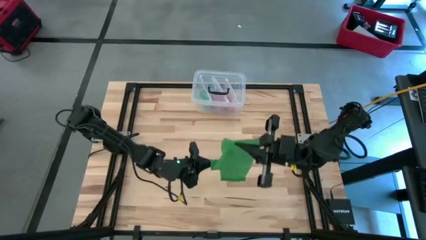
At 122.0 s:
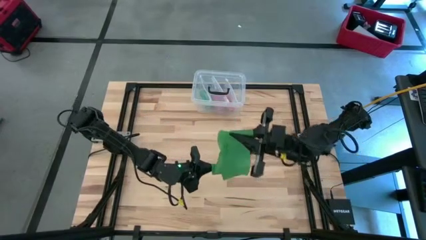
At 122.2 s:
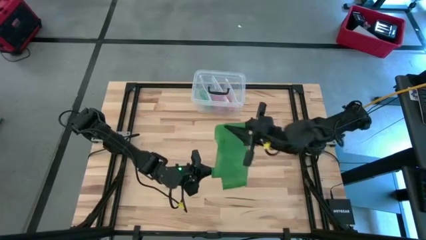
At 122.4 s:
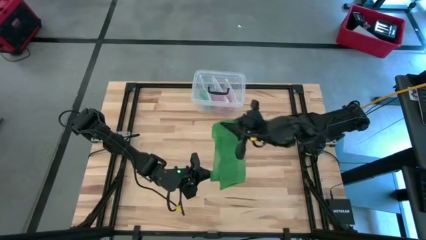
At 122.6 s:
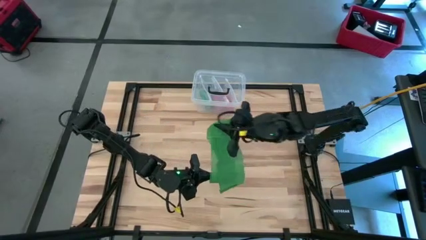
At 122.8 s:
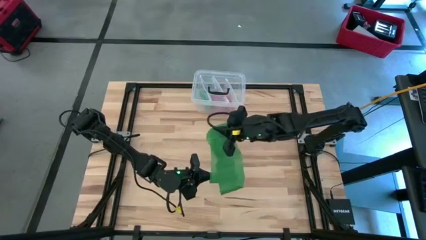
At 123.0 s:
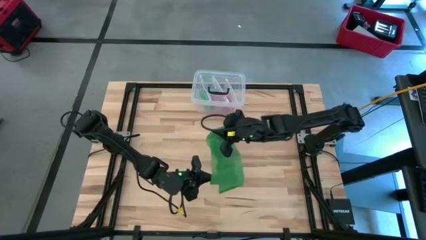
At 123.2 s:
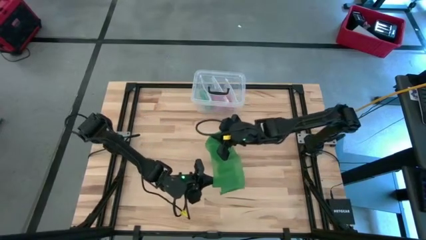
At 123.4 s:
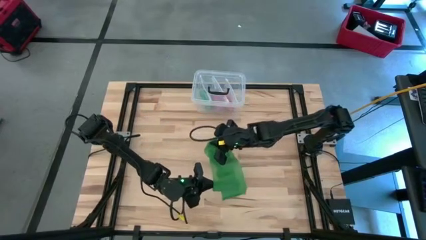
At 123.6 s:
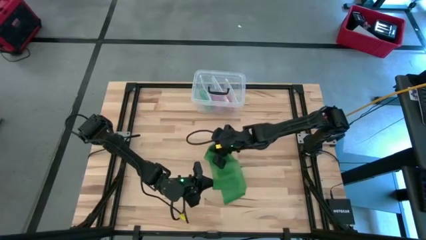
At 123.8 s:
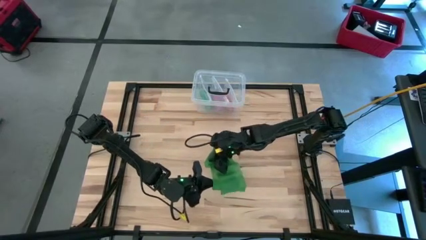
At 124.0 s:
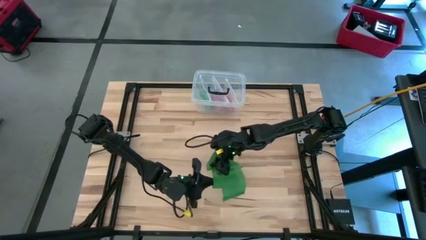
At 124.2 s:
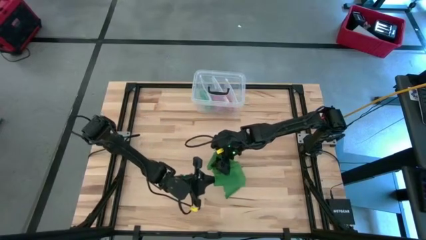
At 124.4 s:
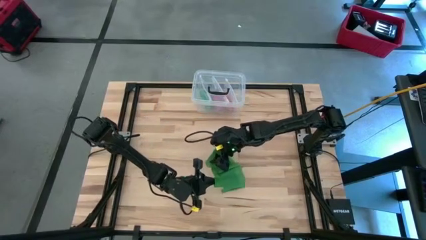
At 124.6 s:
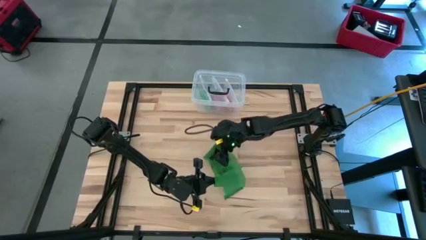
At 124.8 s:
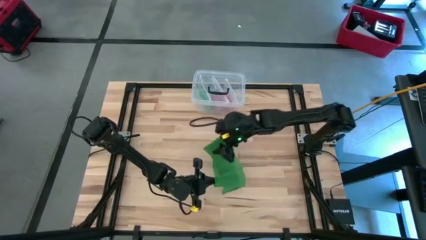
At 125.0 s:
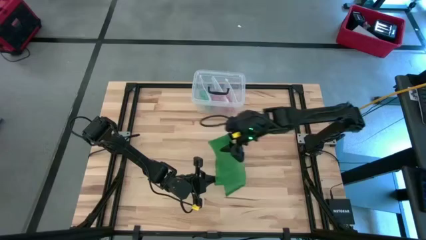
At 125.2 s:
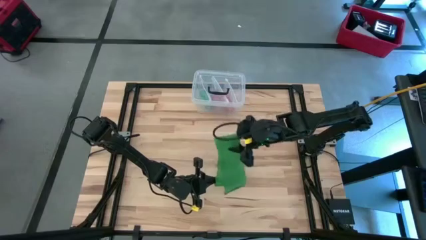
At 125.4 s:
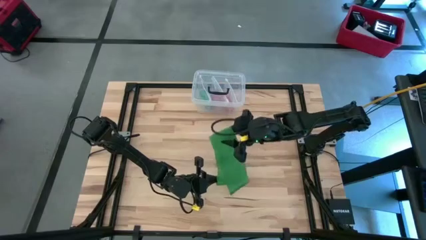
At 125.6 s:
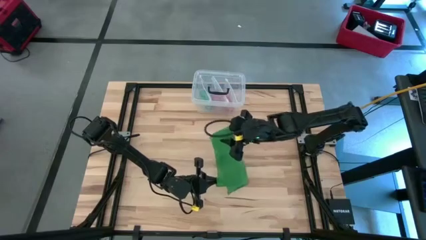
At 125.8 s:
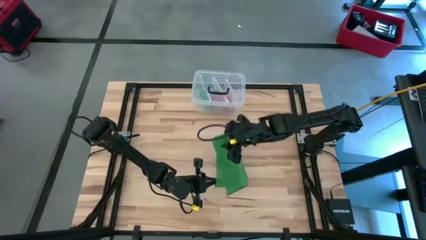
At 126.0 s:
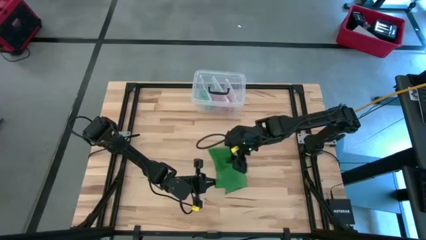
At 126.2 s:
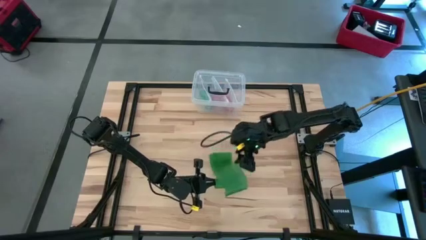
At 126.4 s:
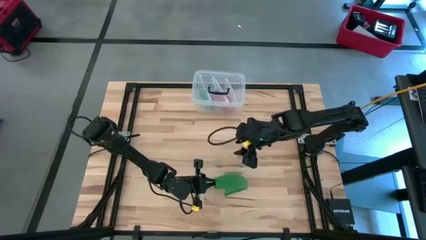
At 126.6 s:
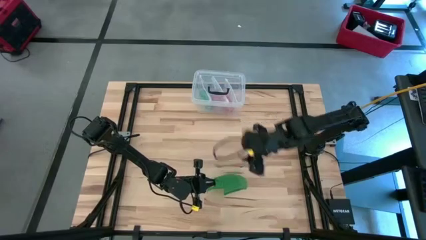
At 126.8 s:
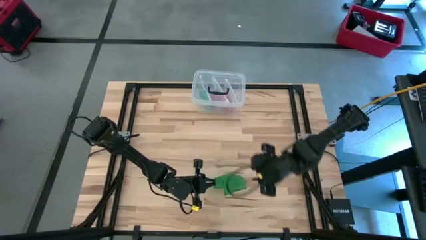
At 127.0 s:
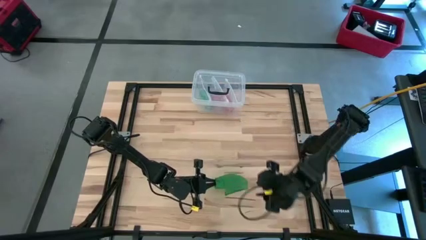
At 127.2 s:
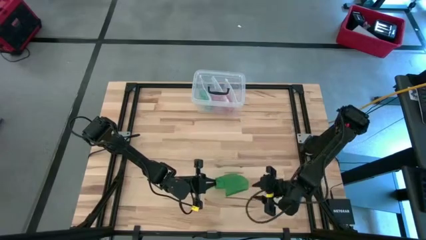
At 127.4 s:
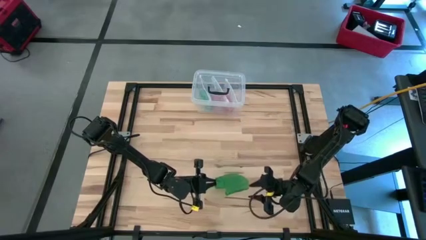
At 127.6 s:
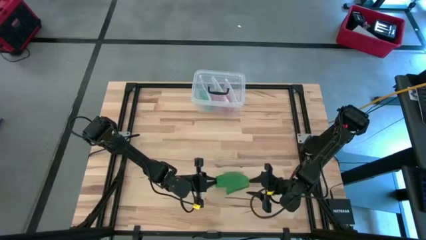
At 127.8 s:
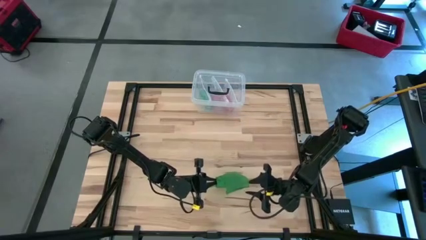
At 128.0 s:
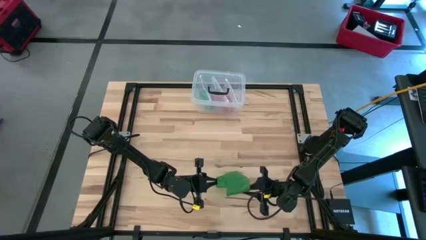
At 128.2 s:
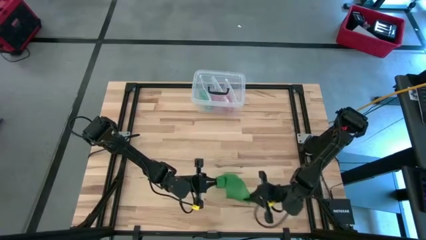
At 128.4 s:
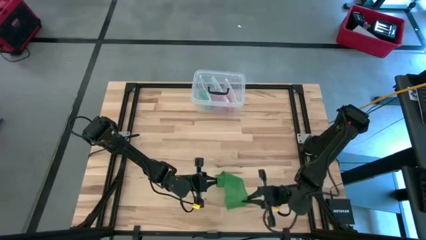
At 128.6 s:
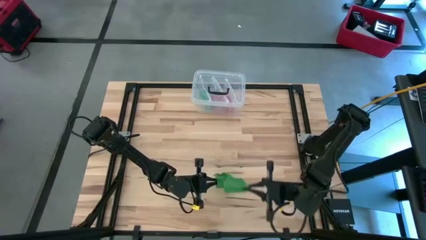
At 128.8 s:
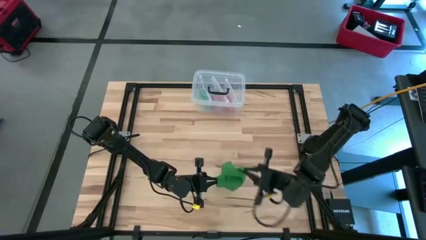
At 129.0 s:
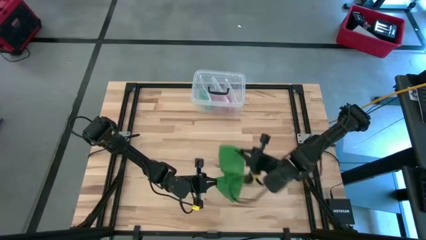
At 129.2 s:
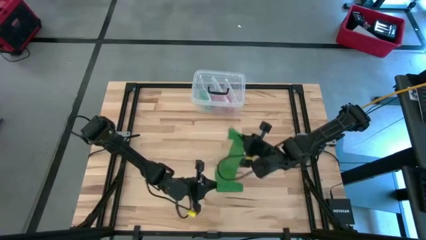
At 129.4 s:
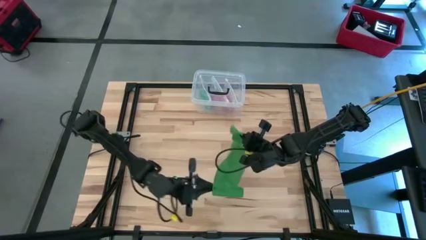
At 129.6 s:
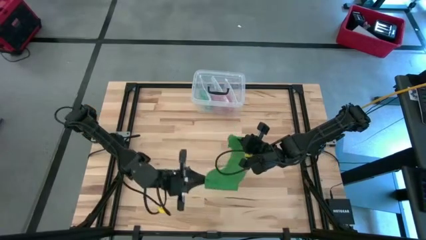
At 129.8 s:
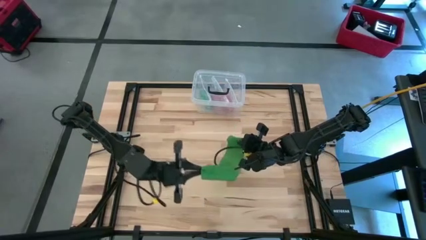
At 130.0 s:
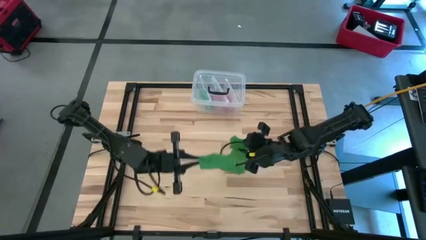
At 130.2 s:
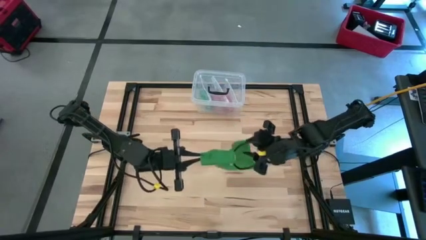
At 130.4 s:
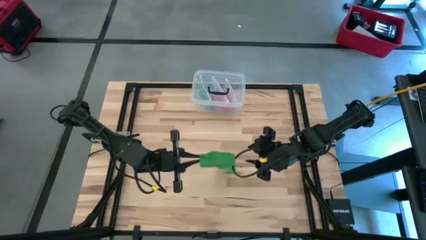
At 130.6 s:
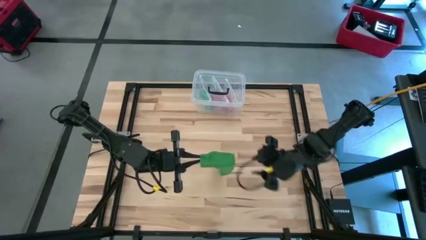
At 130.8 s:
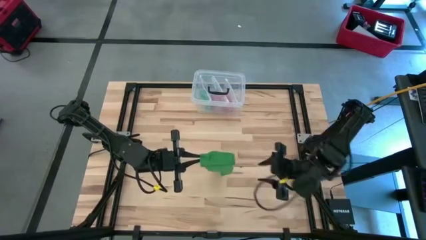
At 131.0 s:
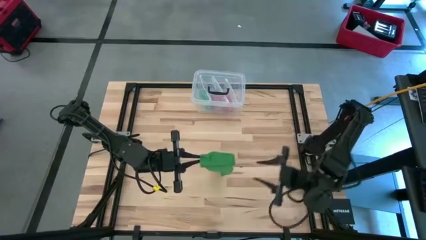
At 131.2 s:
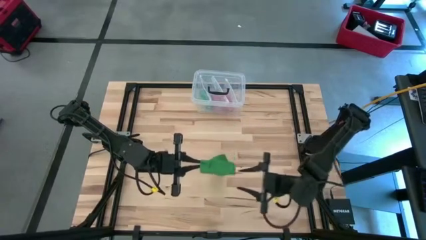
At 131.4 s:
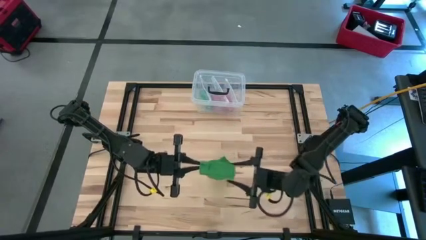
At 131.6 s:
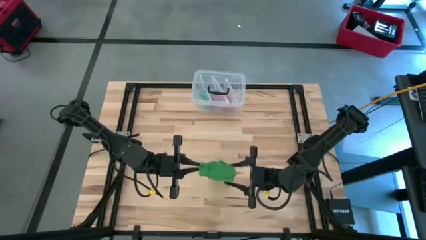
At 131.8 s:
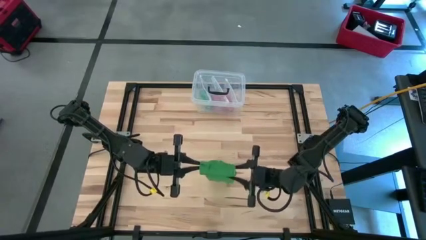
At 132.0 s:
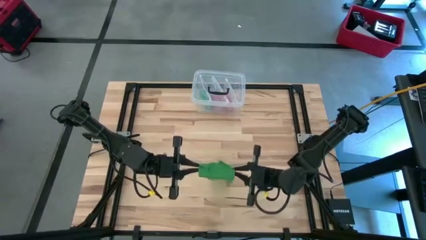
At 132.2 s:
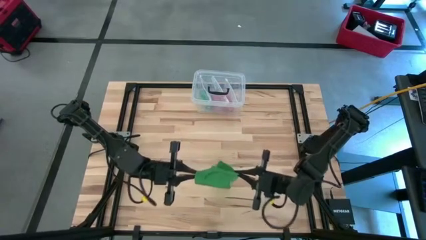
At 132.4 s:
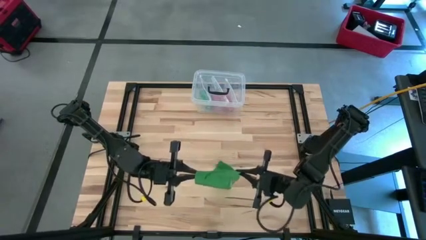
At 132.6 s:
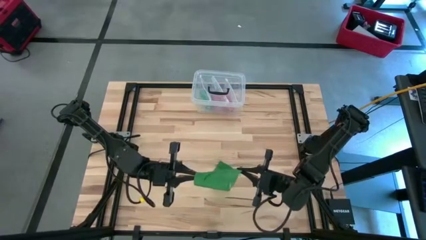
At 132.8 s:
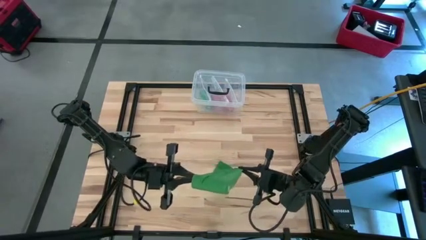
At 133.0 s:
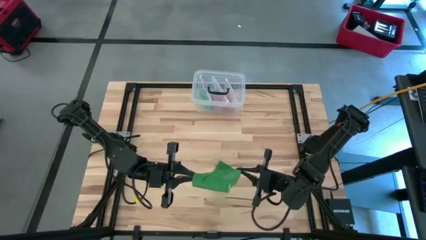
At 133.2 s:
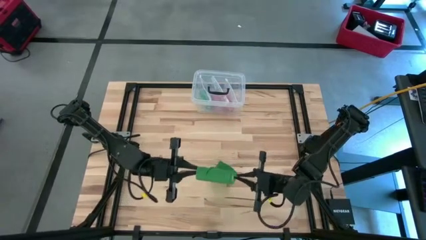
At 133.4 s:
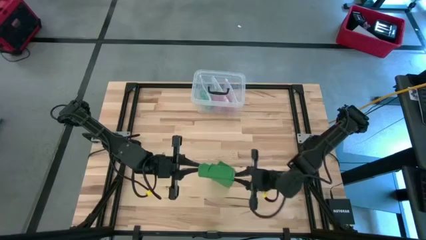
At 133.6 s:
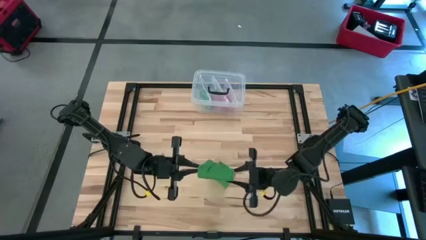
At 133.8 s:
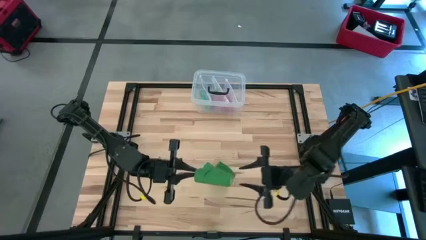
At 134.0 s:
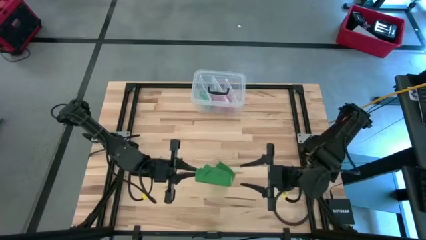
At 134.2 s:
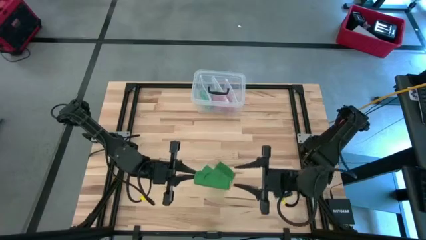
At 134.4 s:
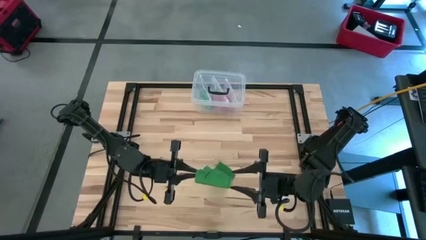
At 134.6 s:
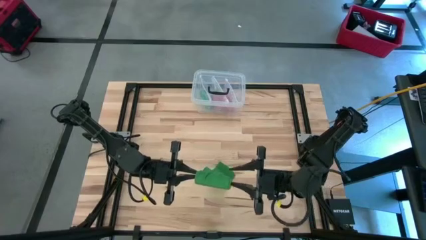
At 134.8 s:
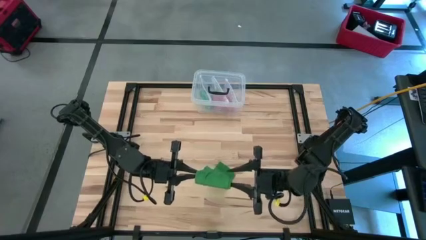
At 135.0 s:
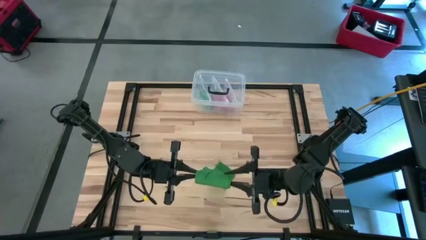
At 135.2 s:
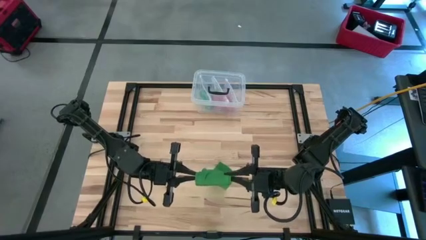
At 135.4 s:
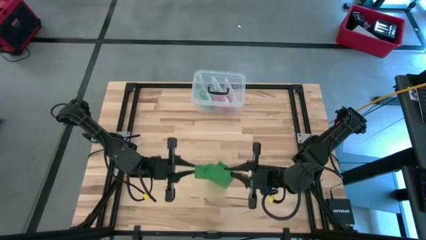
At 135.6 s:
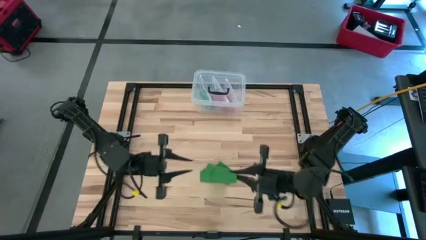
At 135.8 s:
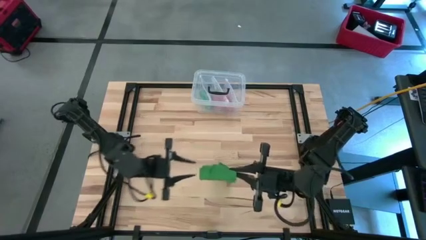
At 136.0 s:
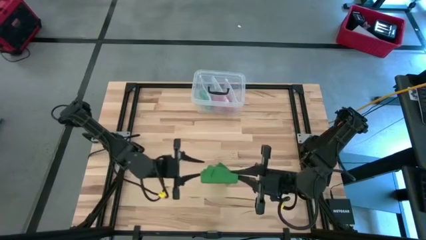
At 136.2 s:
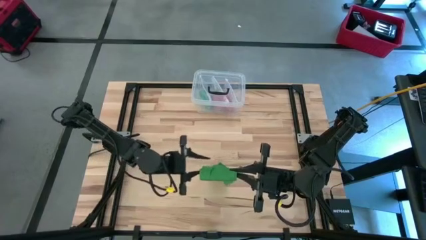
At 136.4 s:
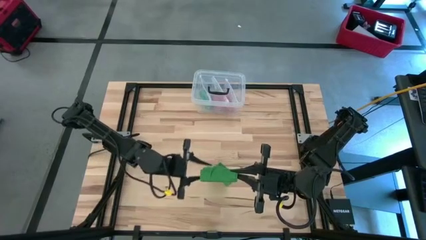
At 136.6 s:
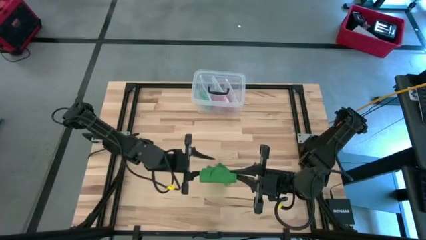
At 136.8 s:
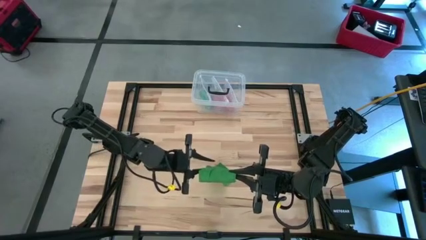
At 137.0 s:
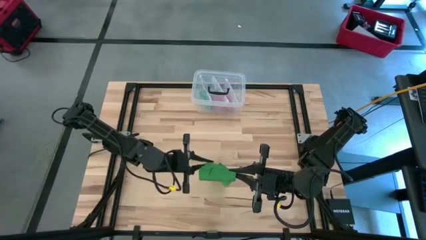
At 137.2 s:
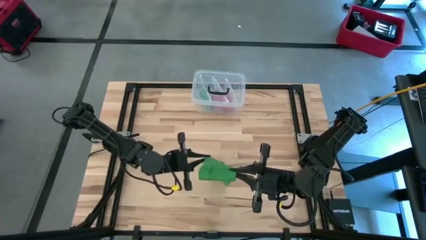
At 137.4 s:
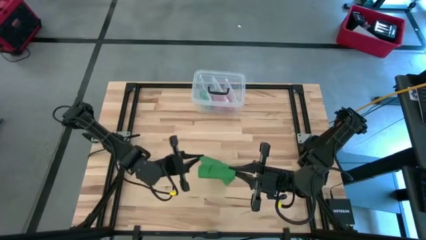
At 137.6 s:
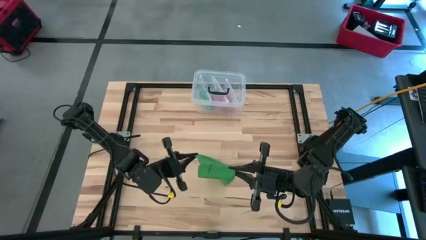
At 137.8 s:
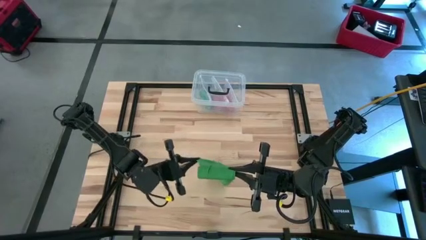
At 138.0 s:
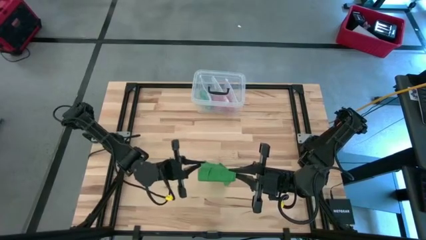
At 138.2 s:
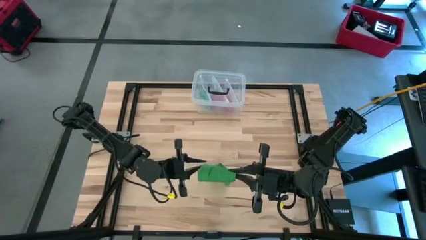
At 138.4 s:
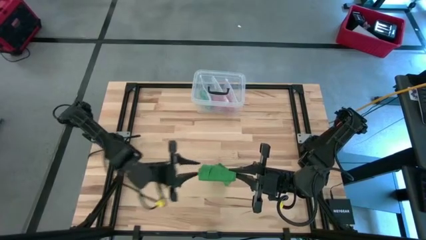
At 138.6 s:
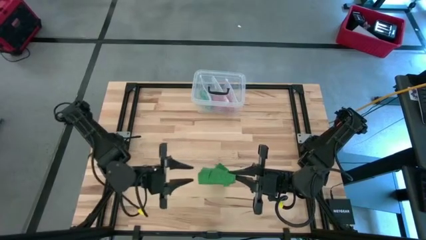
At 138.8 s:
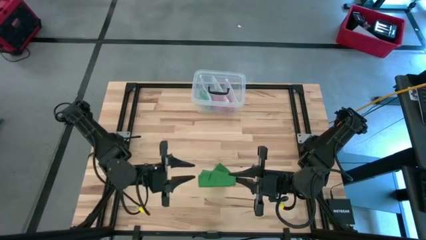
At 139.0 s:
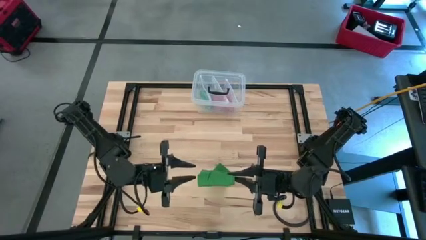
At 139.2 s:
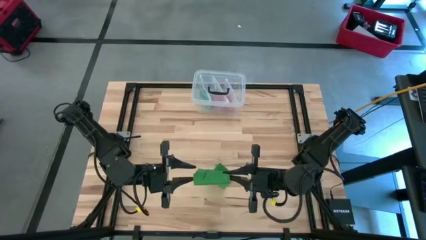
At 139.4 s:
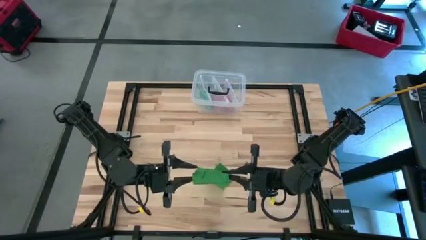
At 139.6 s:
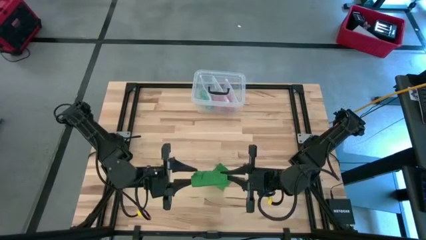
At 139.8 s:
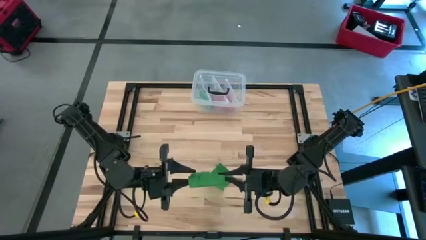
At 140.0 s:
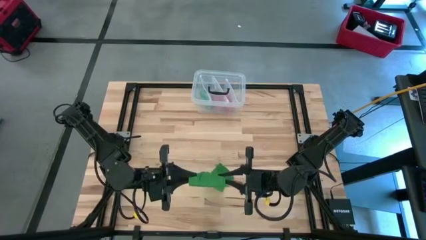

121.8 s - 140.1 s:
Task: Roll bandage
Roll the green bandage
